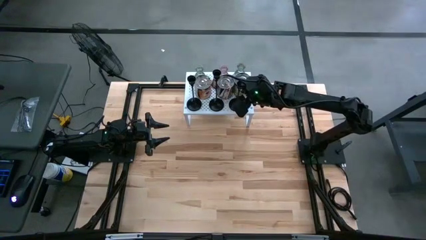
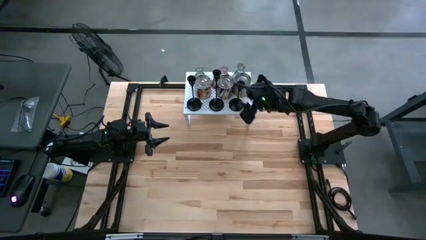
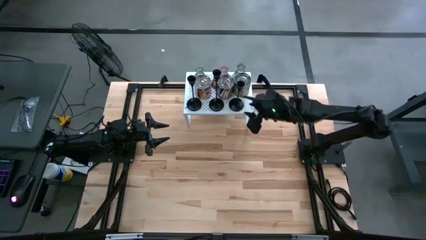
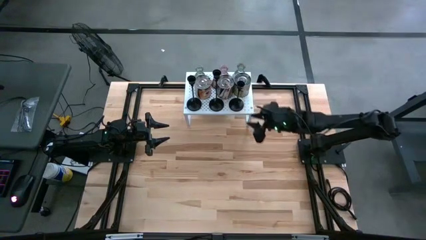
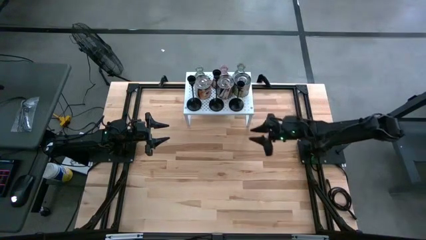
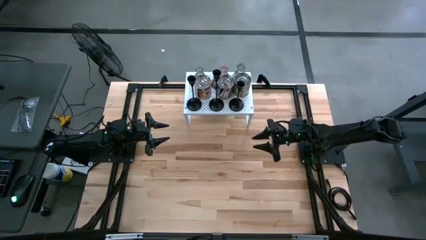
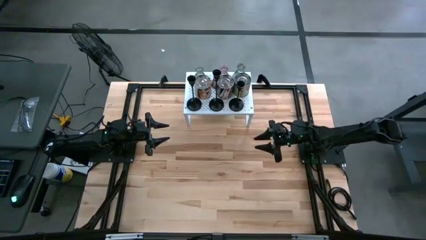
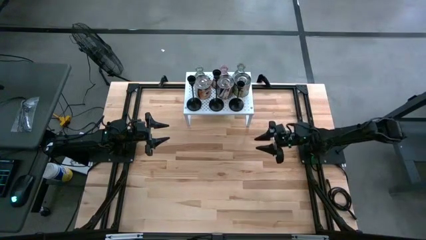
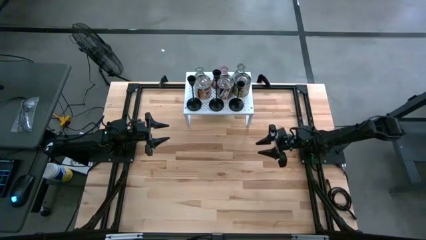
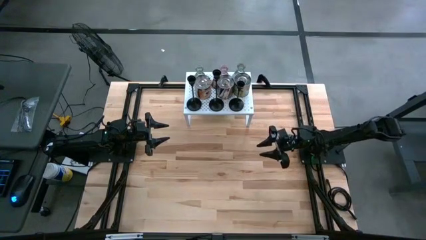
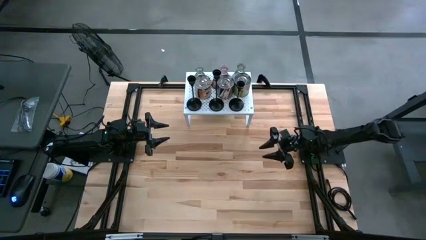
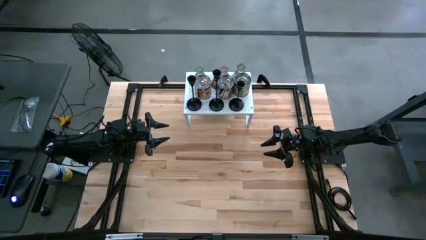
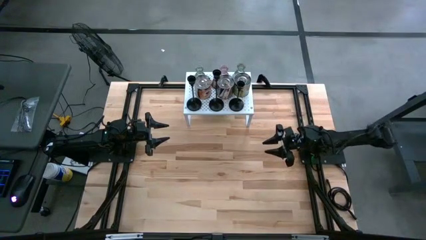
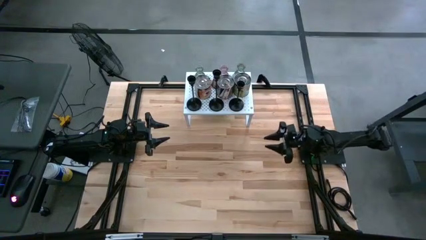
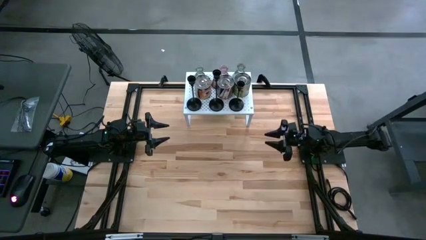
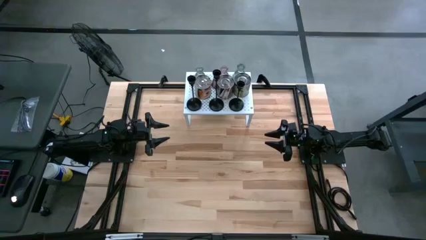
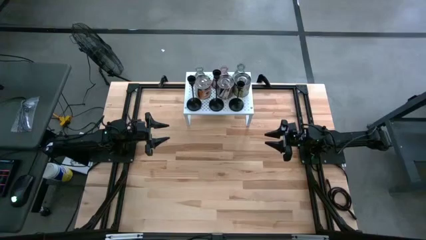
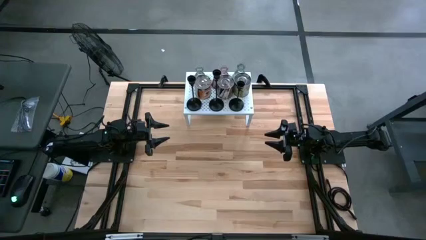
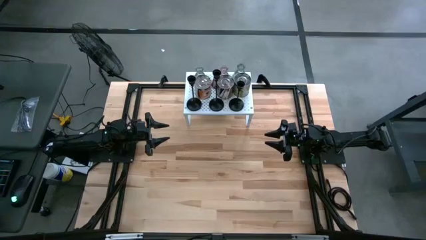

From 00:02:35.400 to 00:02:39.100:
Task: Pick & Place candle stick holders
Return to Home Position

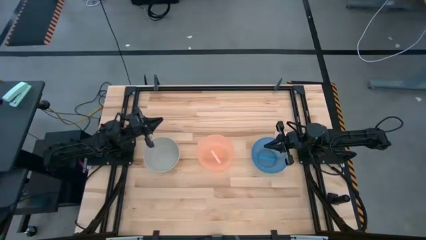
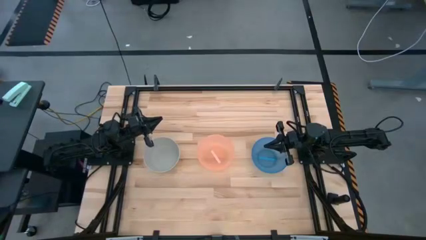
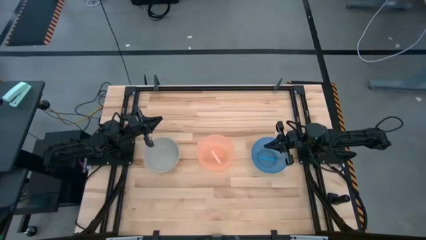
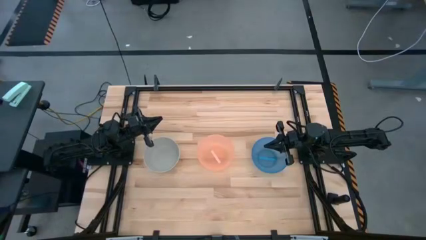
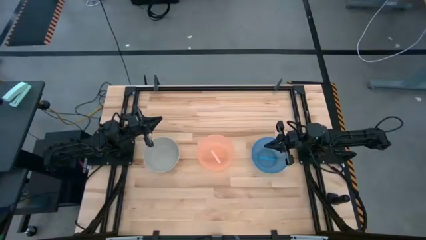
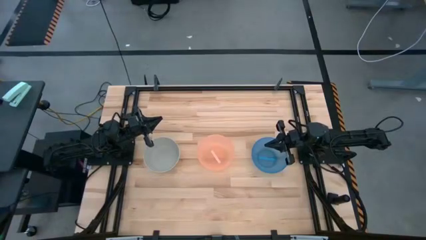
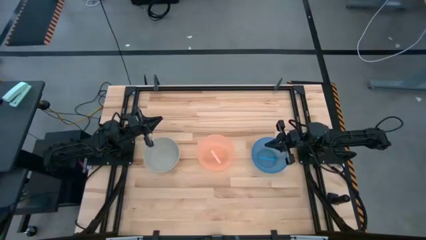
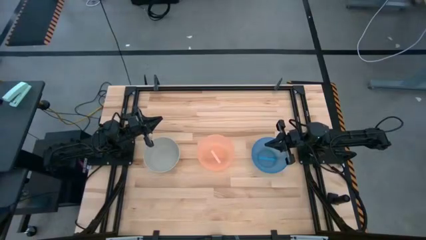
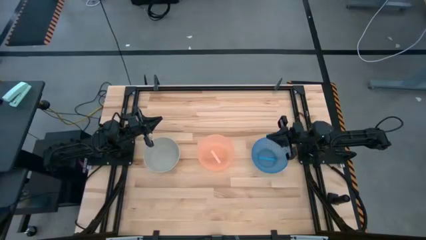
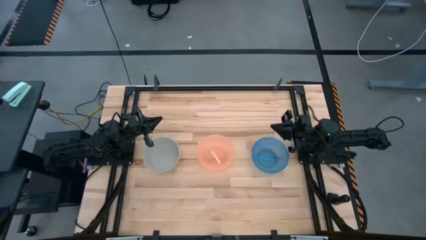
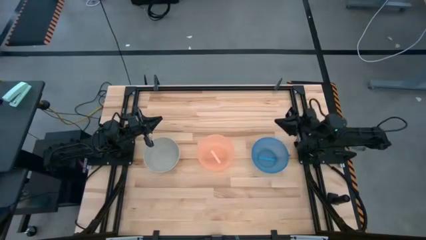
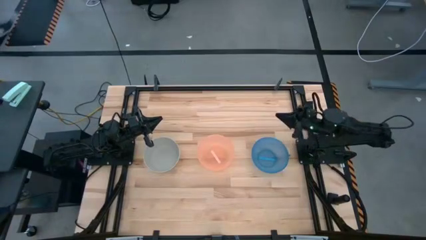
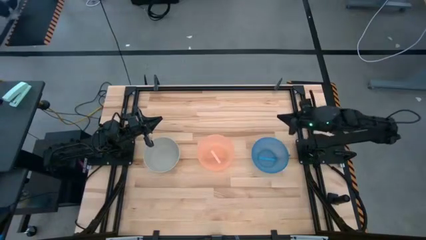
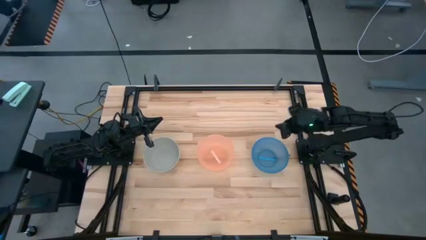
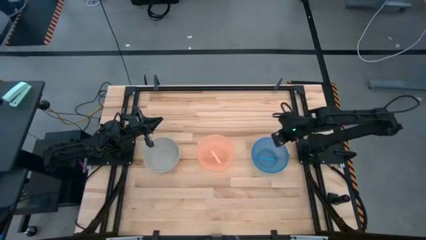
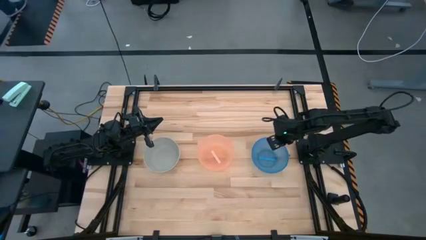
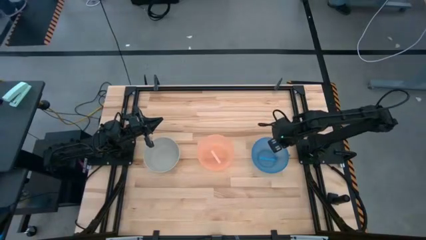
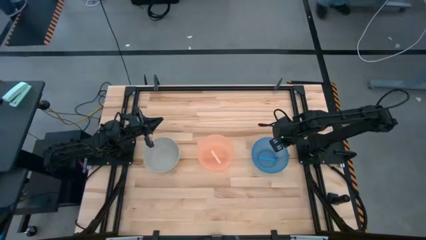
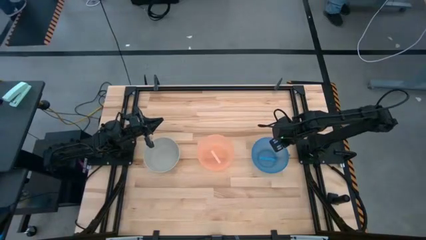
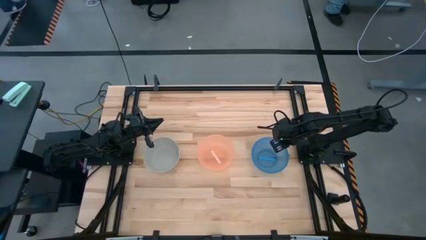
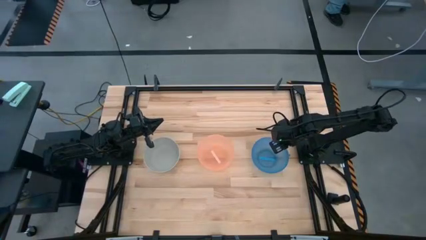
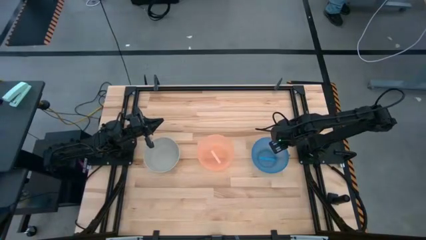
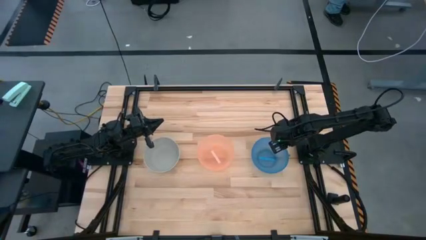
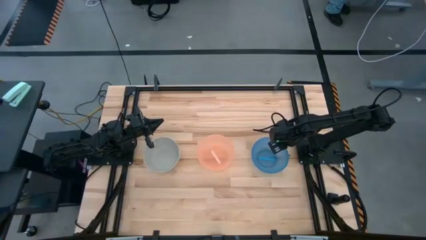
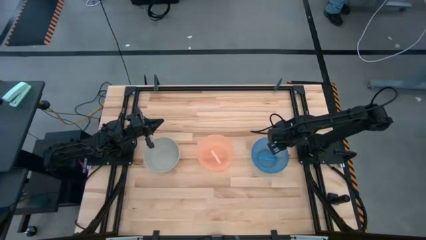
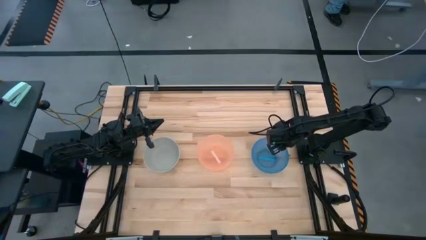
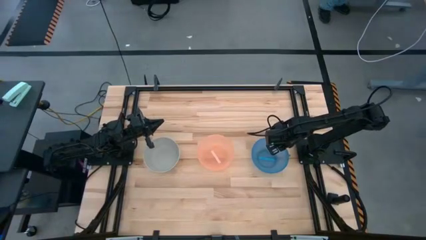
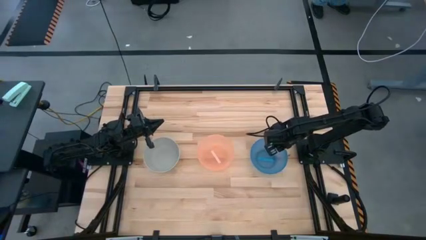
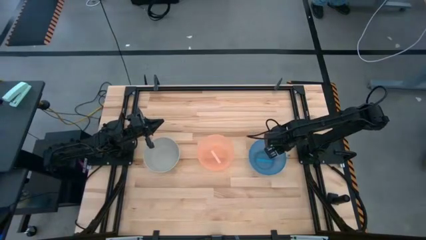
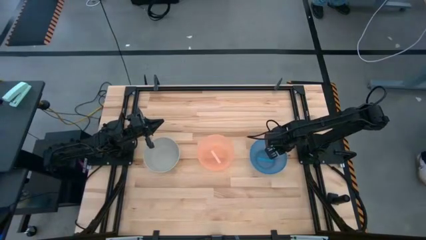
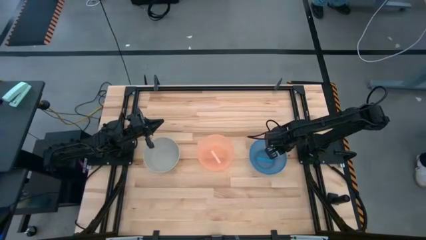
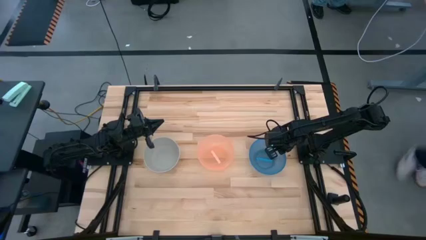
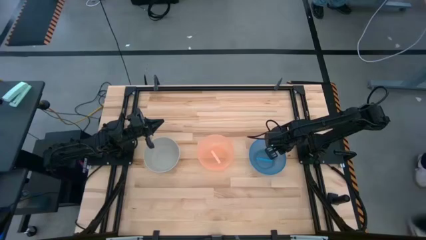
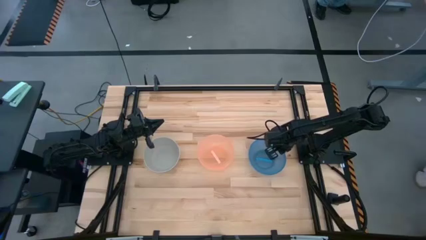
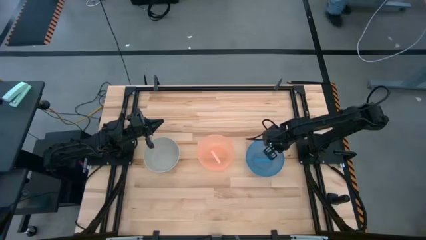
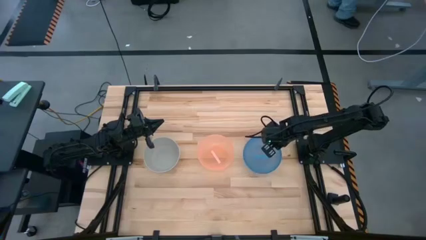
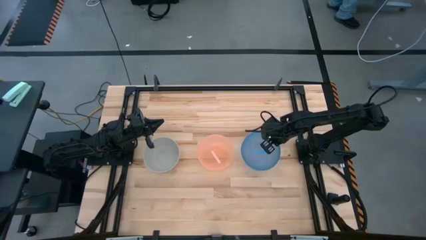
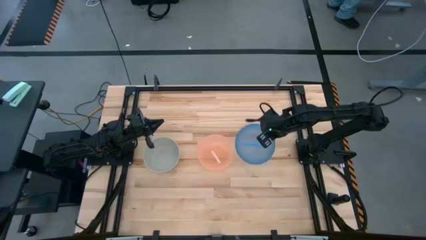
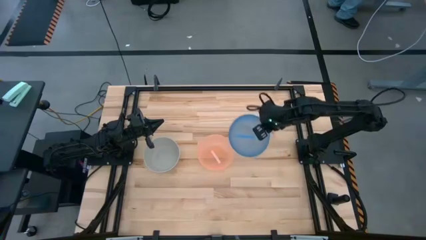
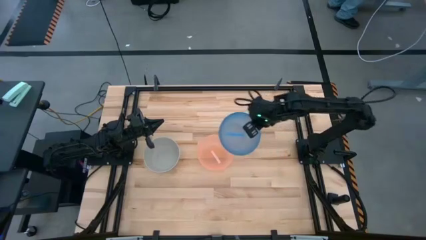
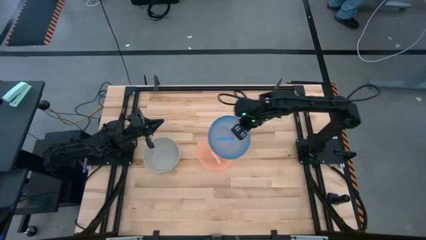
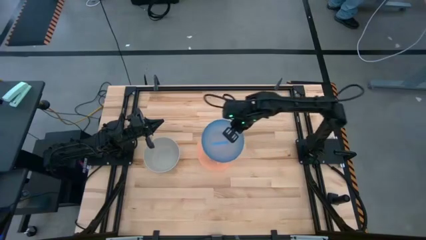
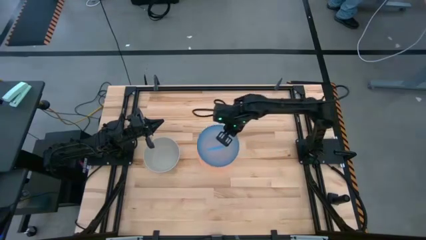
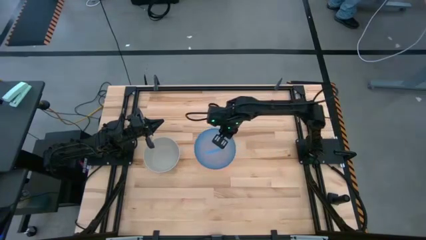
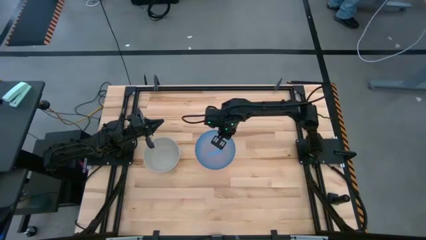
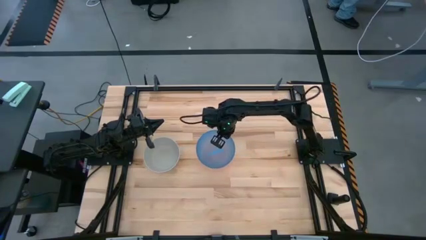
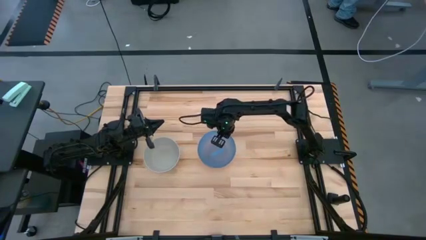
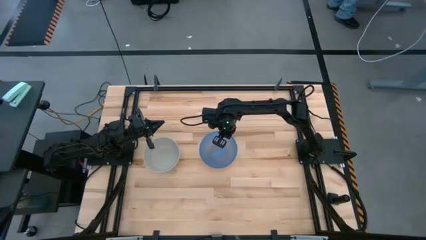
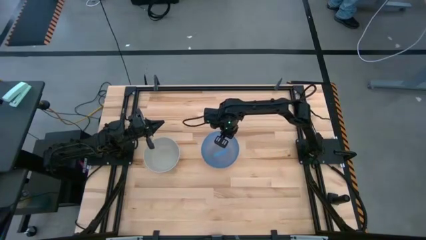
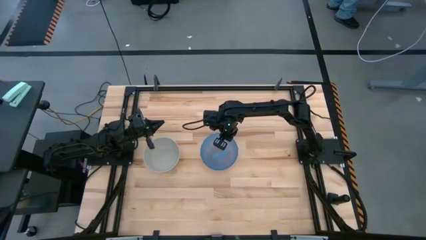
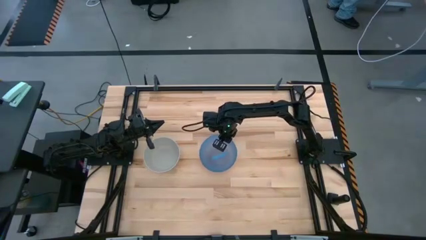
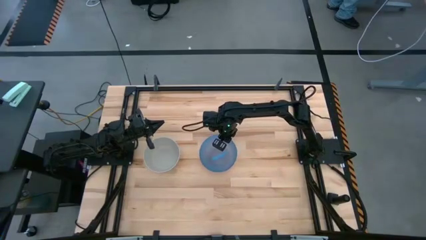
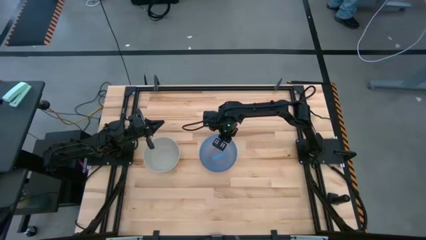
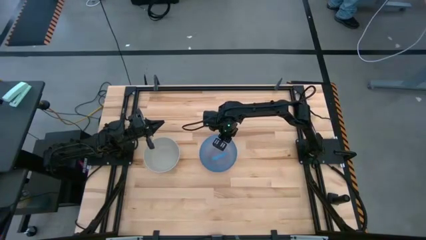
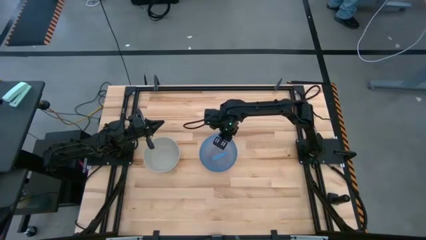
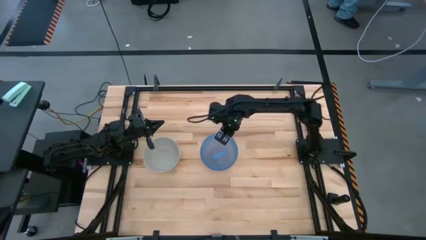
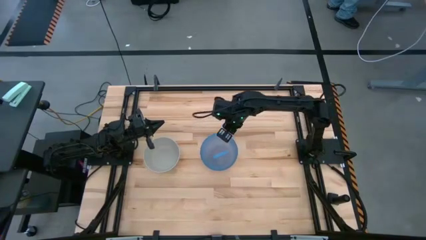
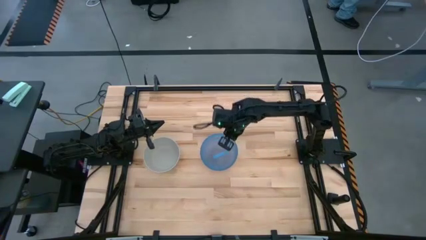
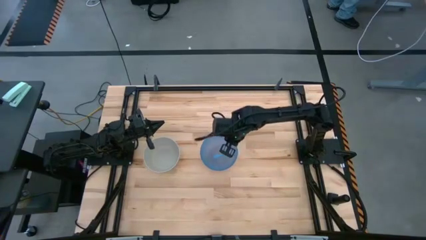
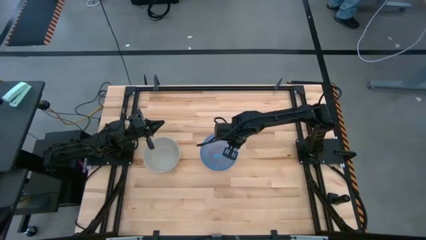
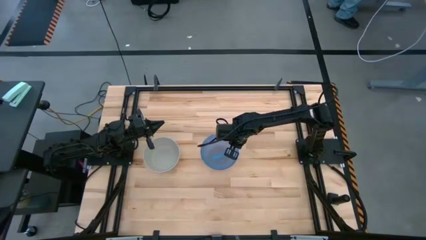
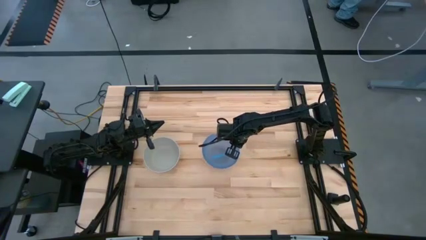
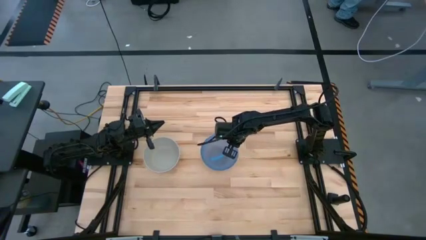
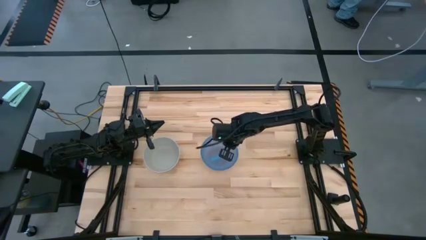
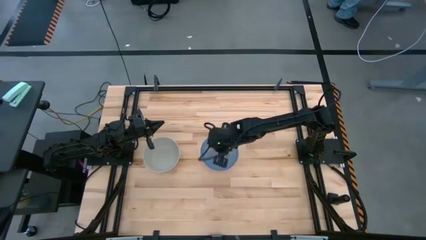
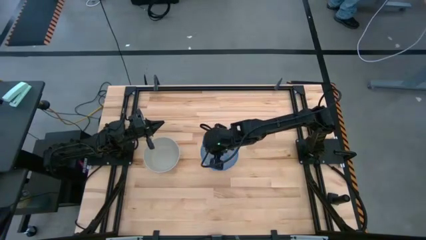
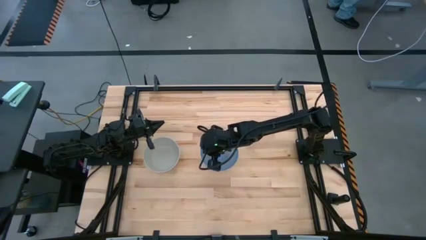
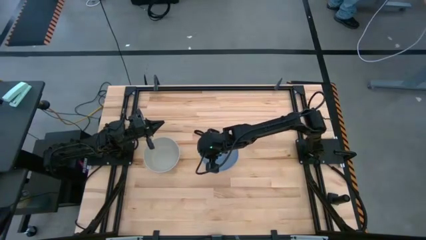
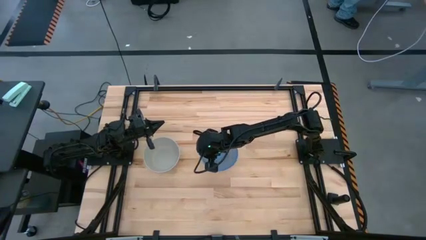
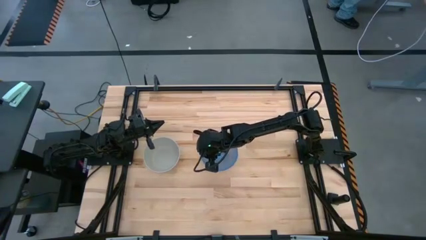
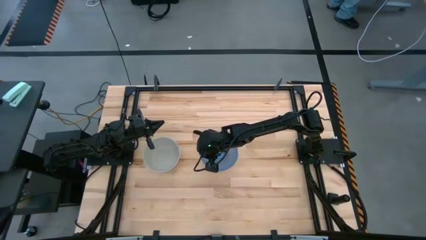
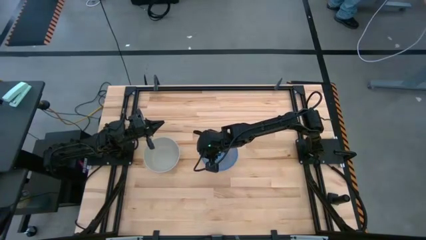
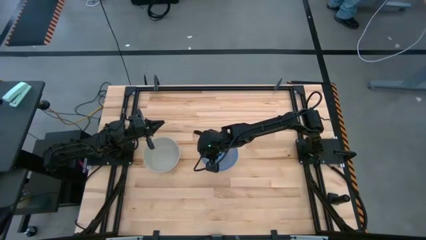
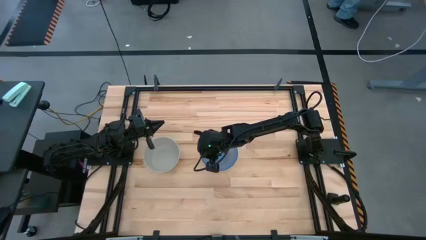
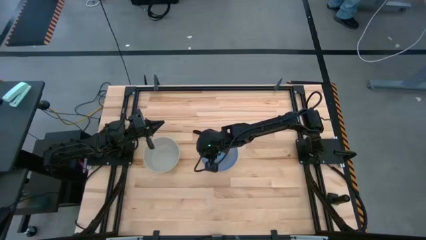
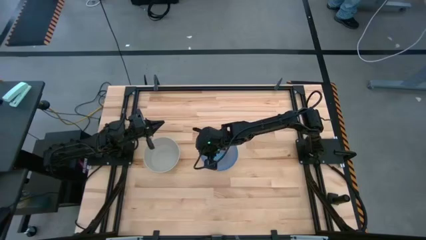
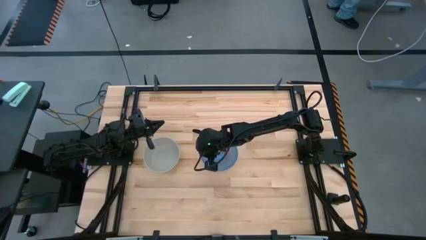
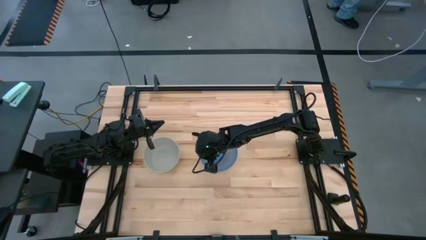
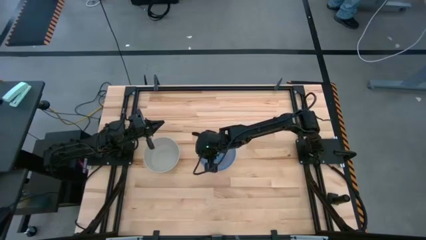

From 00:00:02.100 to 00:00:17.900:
Task: Nest bowls inside each other
Stack the blue bowl on the orange bowl
